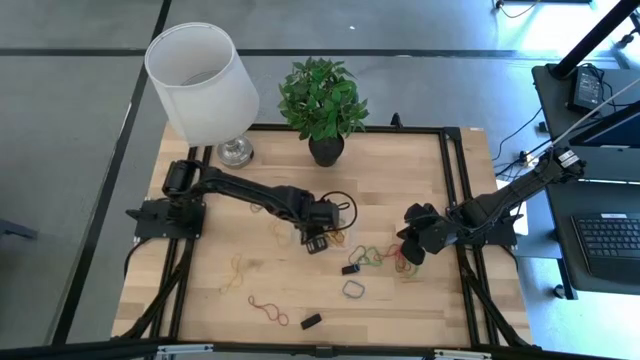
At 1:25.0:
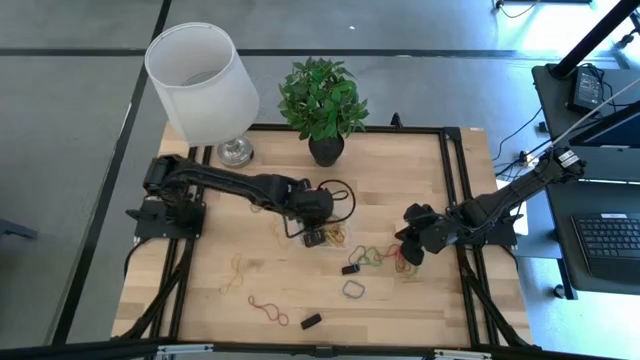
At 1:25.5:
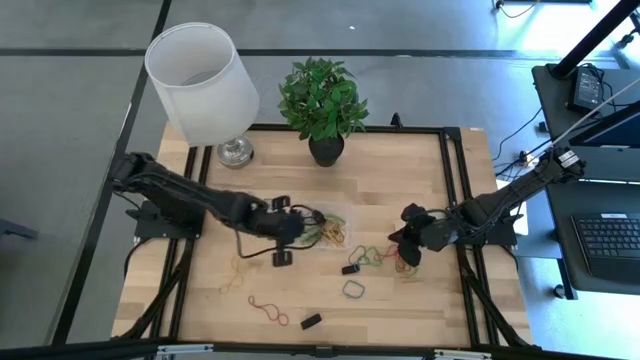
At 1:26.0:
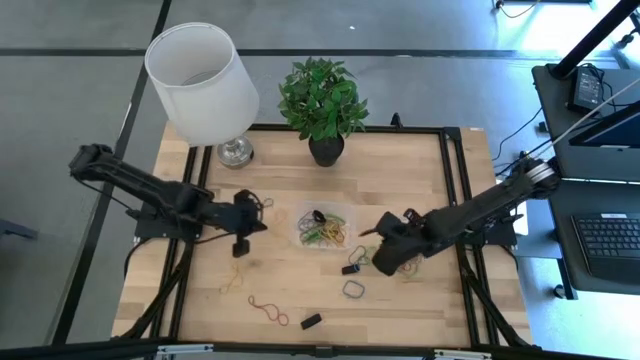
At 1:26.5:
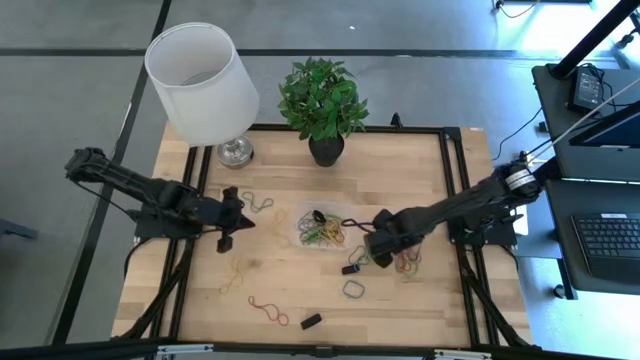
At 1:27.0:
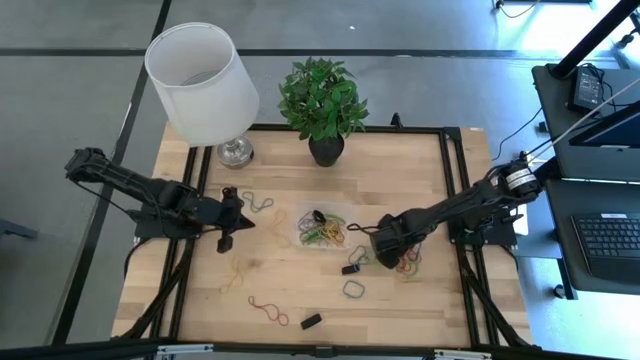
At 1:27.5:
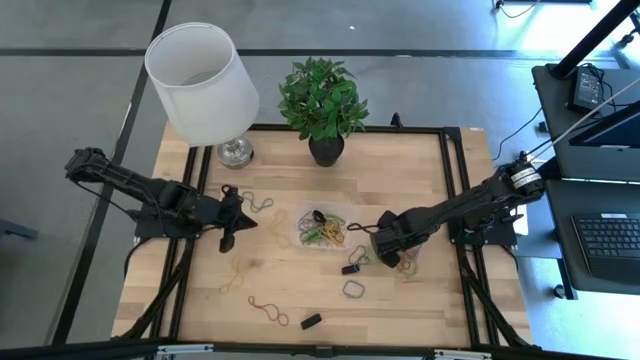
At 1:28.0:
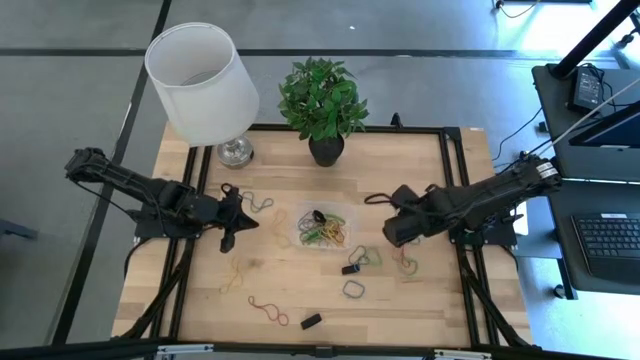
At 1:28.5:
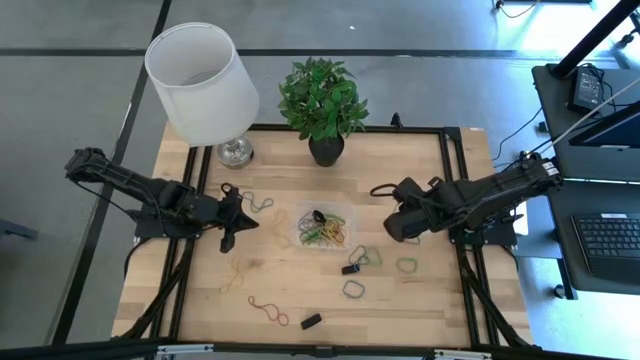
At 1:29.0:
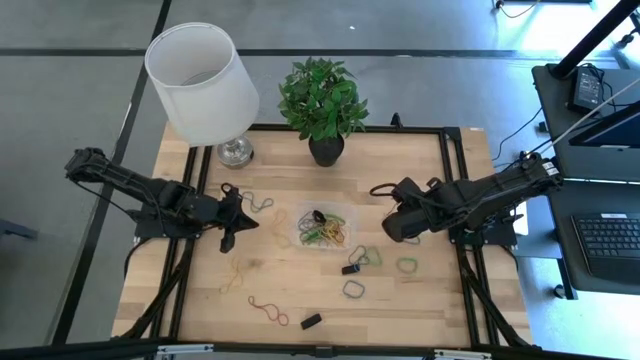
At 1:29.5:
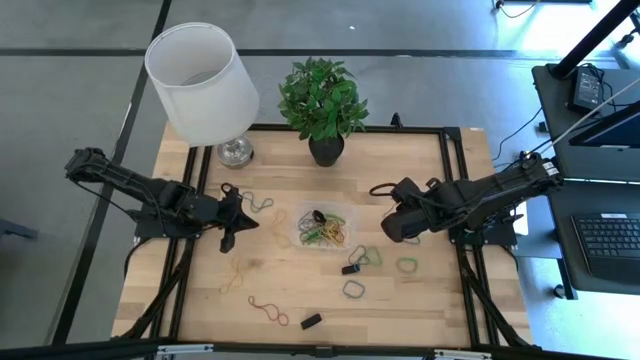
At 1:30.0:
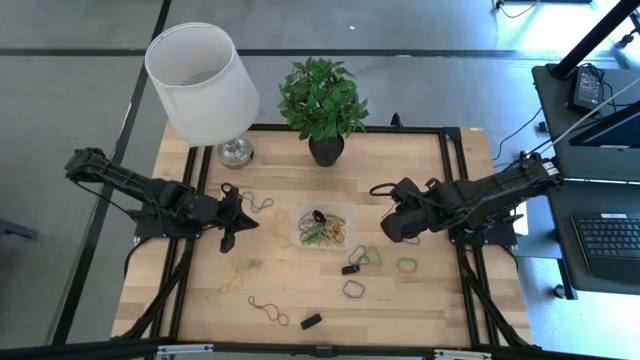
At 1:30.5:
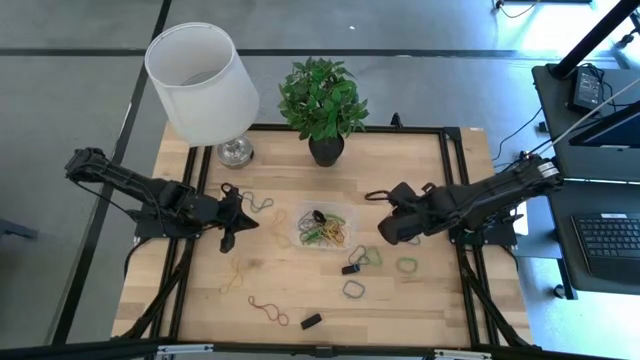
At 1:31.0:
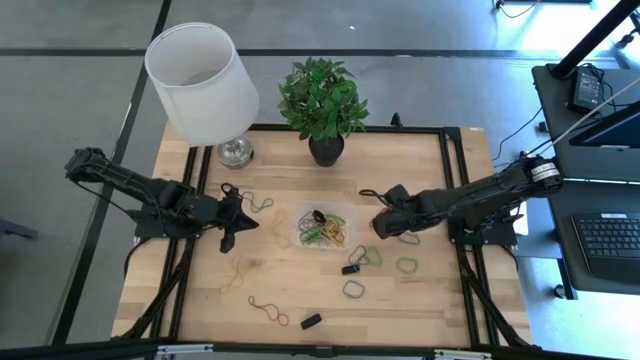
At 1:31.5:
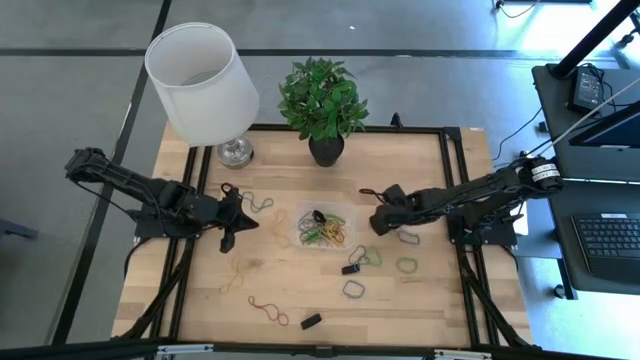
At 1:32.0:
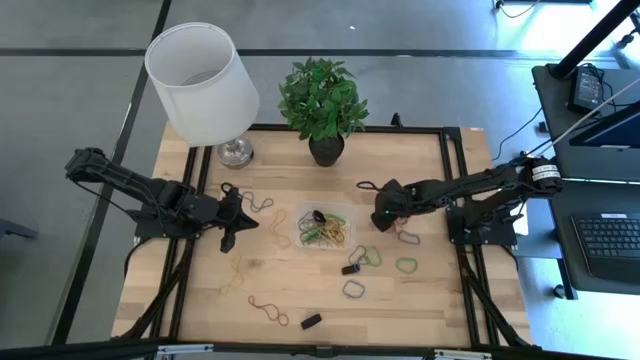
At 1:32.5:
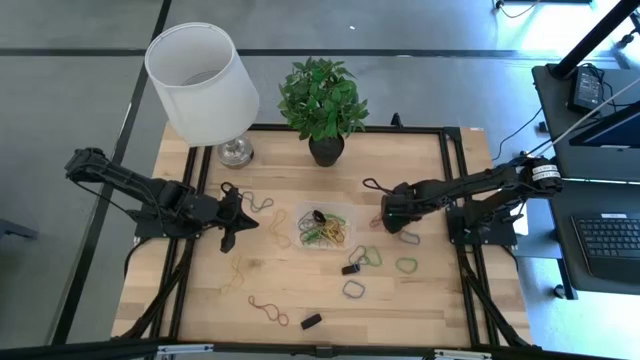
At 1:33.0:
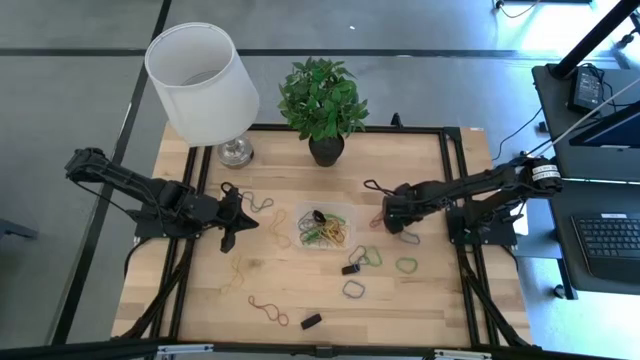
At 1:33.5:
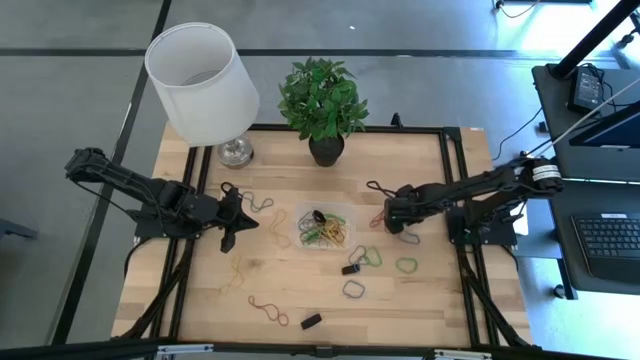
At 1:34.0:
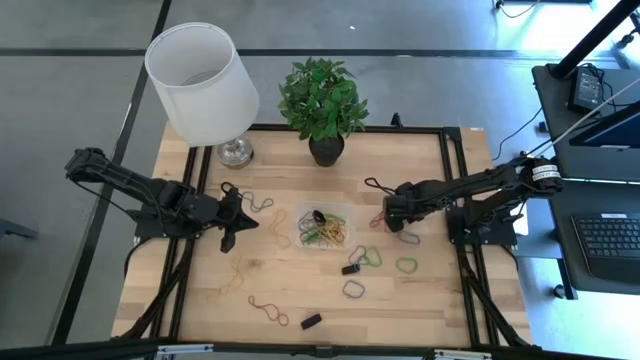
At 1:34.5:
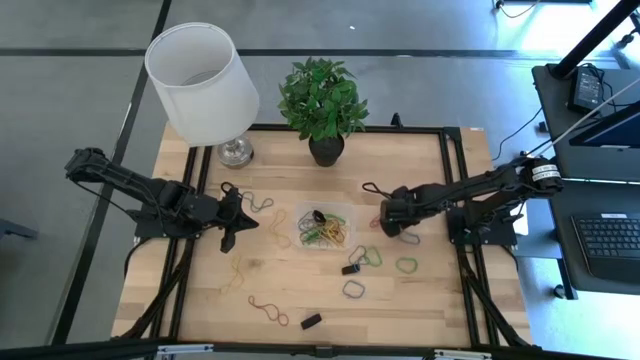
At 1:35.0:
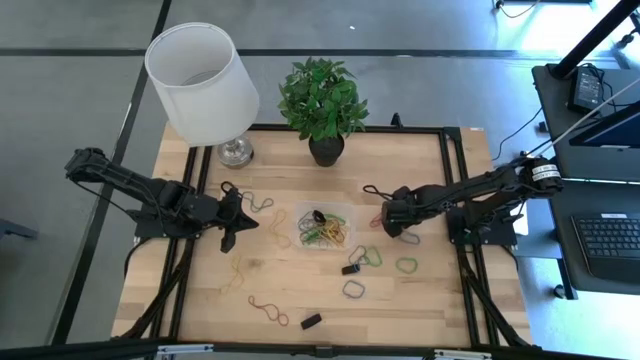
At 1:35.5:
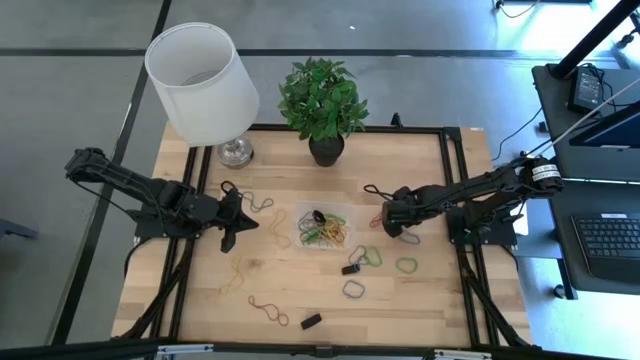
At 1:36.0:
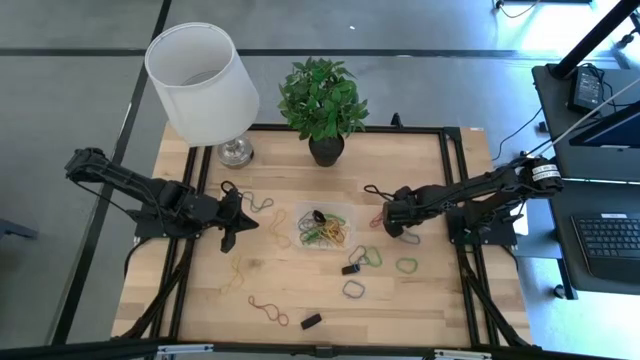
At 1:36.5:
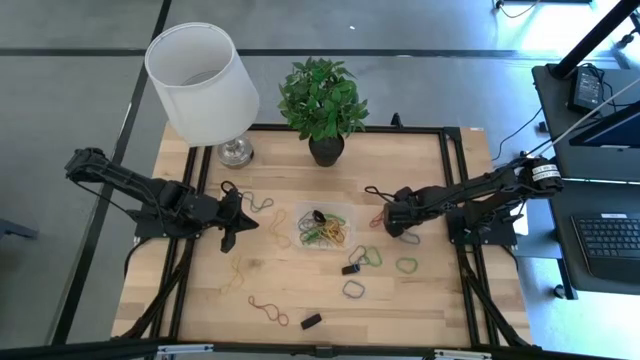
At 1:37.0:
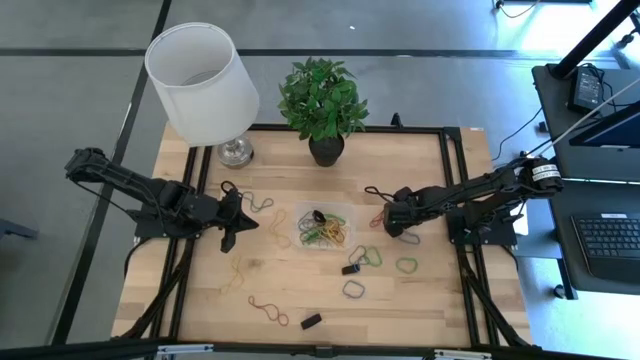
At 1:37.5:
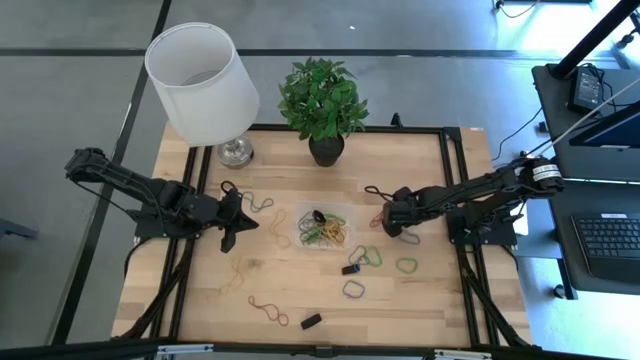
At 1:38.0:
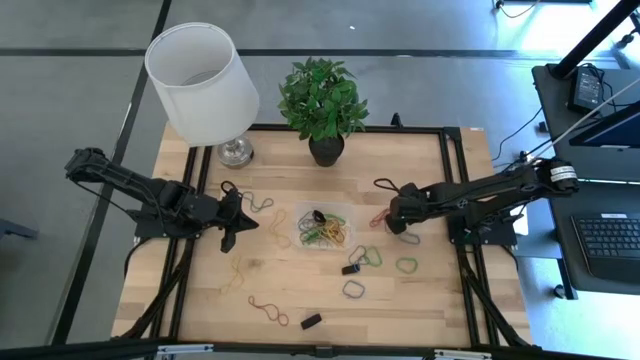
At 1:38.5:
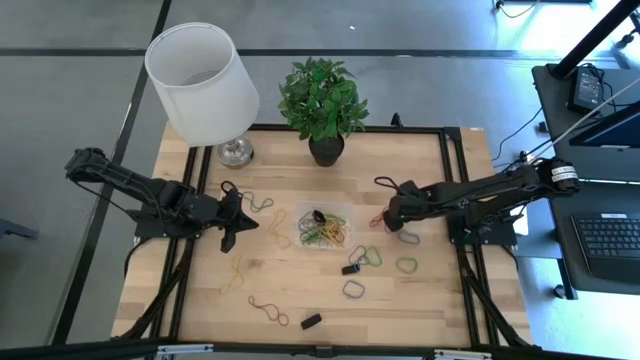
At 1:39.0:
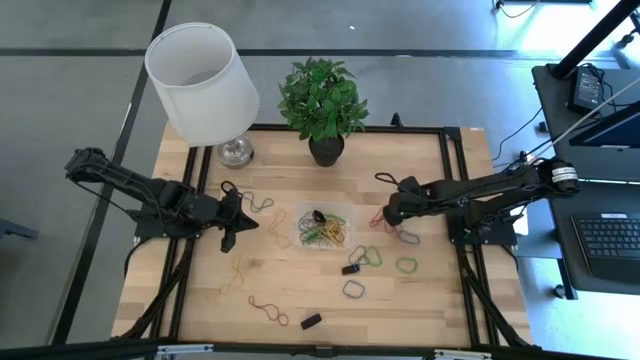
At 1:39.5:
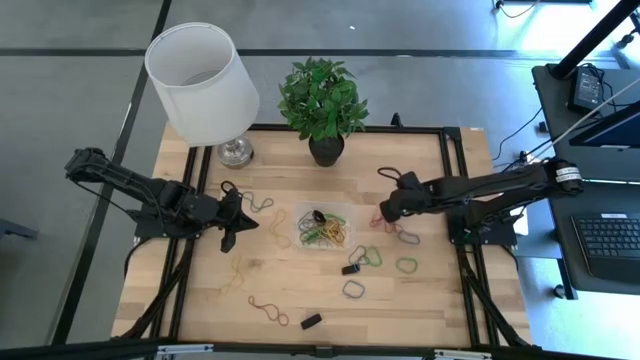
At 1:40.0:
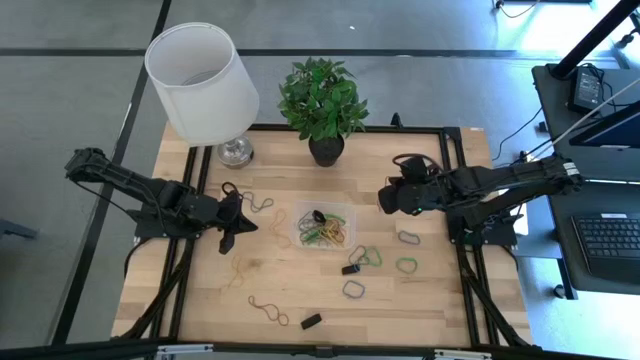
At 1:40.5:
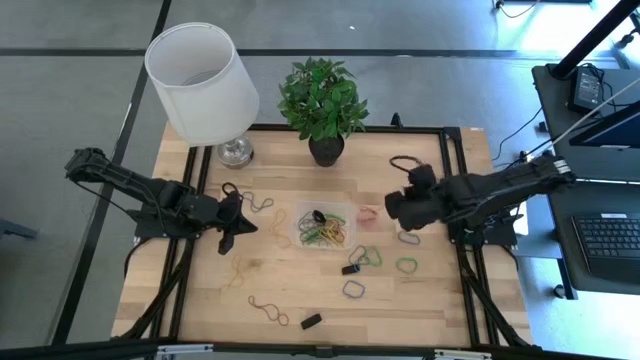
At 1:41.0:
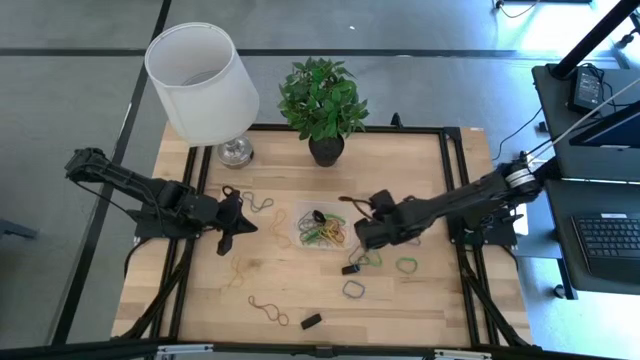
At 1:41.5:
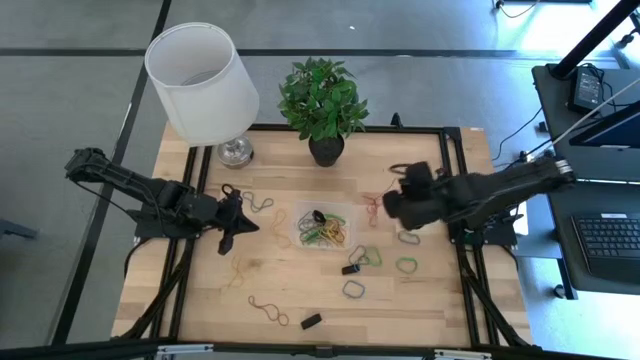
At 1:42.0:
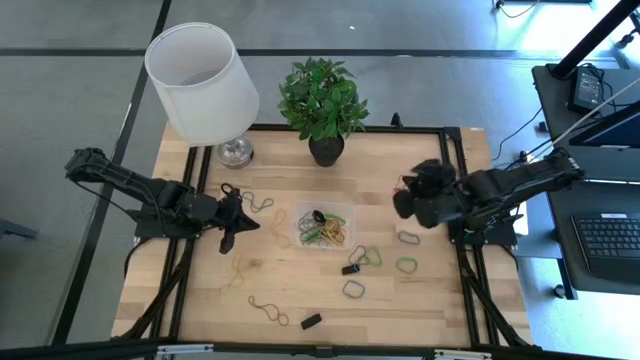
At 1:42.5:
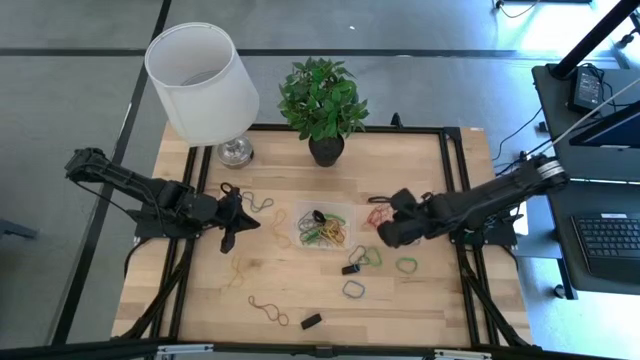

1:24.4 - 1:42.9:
Task: Pick and place rubber bands into bin
Put the red rubber band into the transparent container

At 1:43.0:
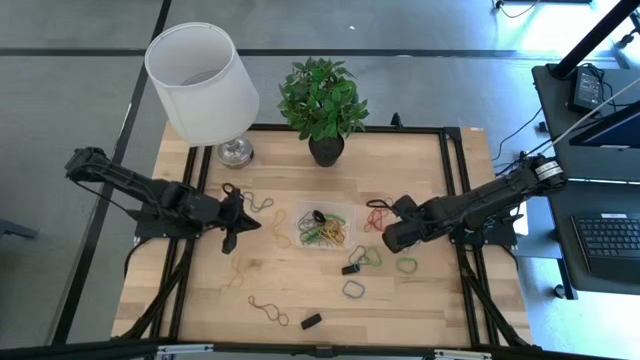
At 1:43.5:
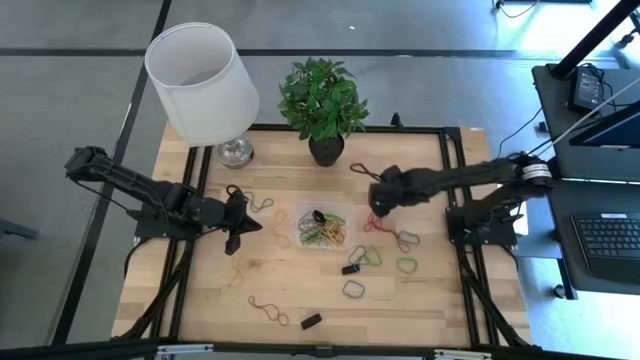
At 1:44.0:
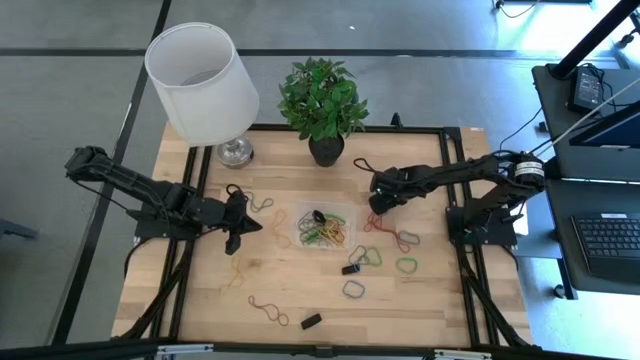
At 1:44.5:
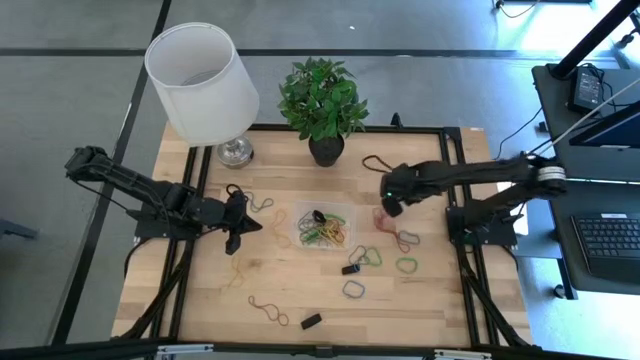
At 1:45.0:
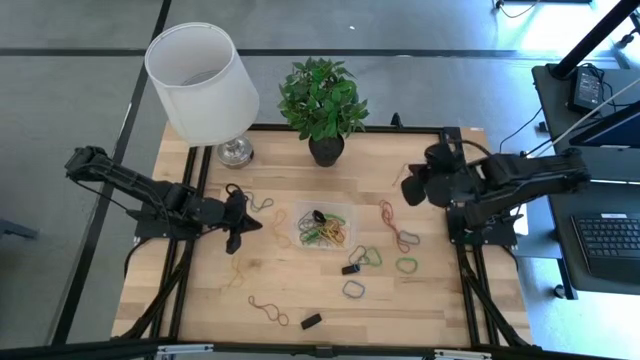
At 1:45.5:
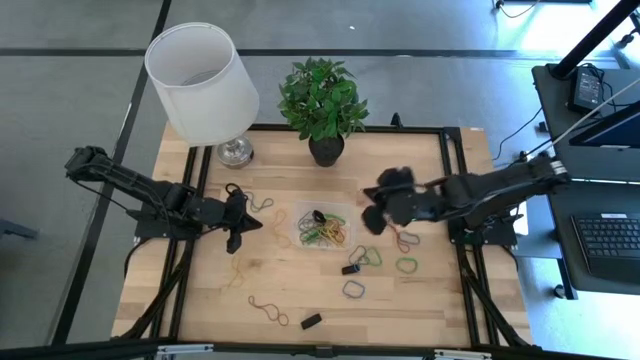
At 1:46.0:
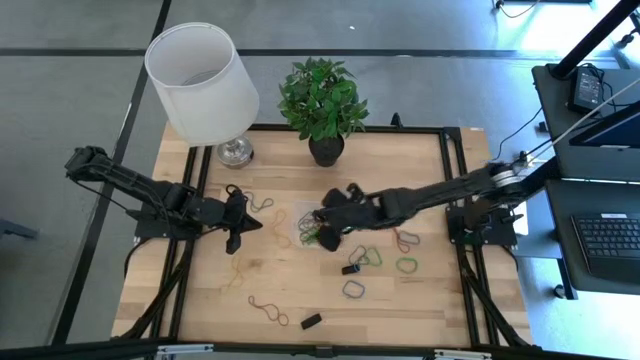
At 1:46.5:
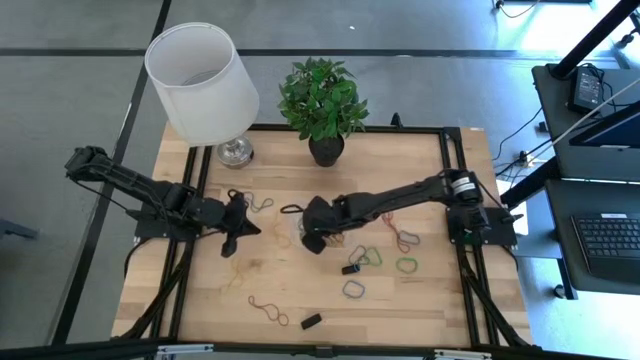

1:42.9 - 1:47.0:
Put the red rubber band into the transparent container
